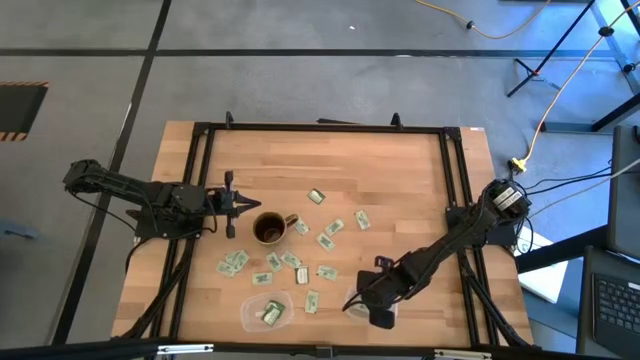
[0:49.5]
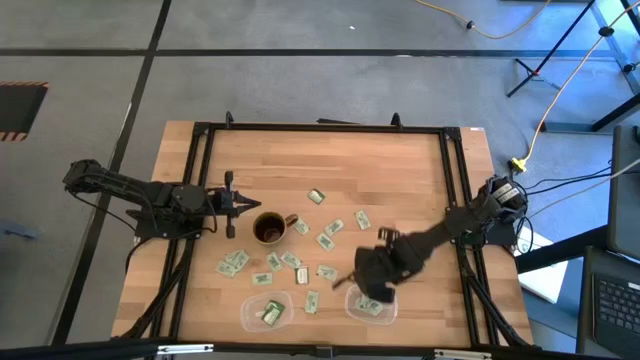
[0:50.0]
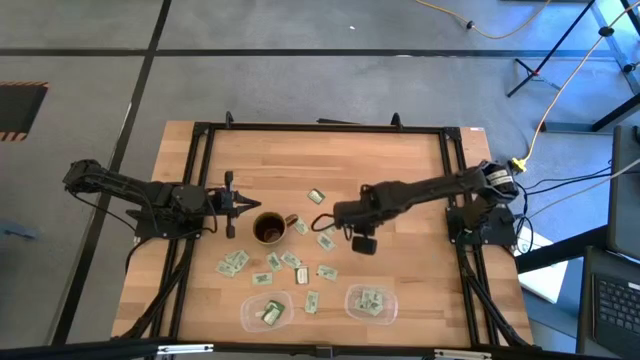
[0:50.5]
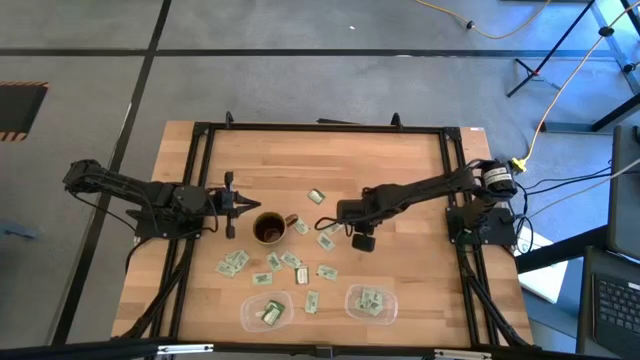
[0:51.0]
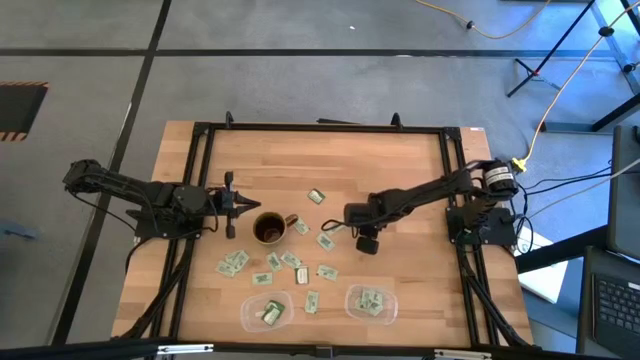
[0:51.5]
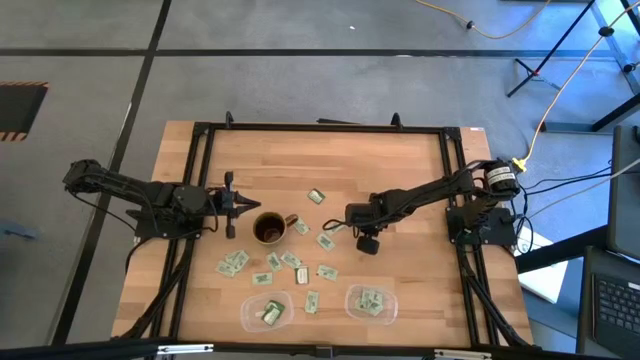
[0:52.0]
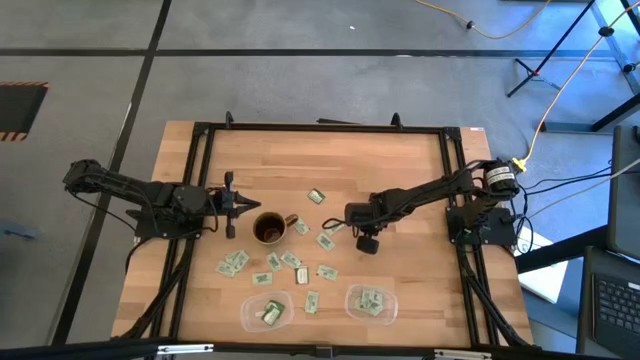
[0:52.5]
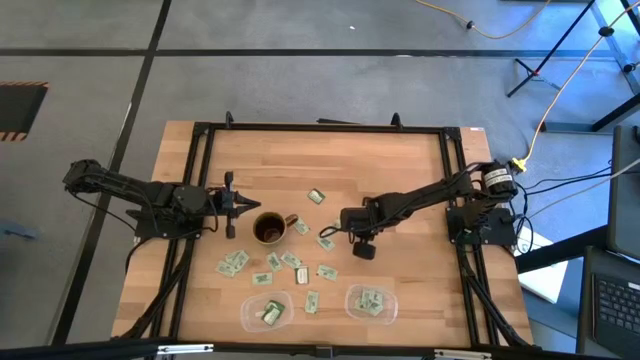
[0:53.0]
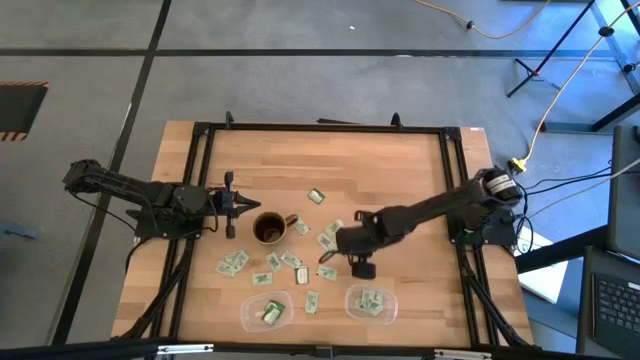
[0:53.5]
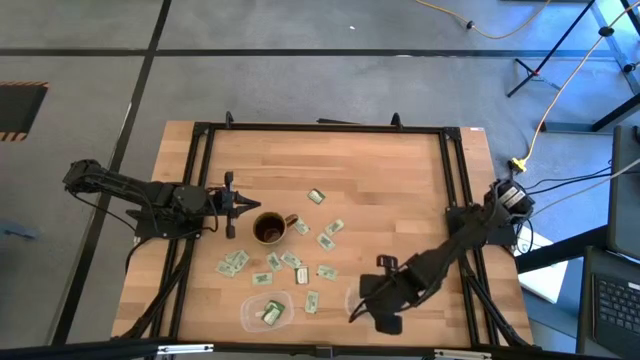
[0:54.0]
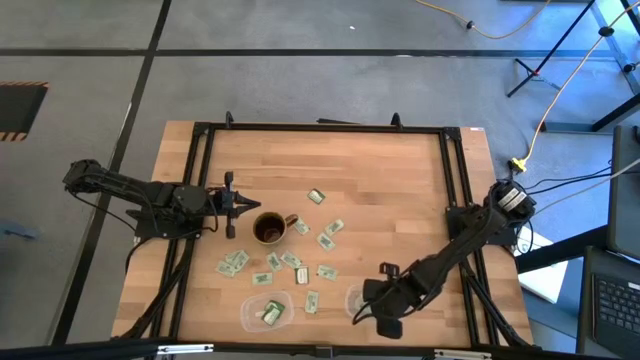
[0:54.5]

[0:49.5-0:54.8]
Task: Pick and place items into bin
Put the white stevia packet into the right transparent bin

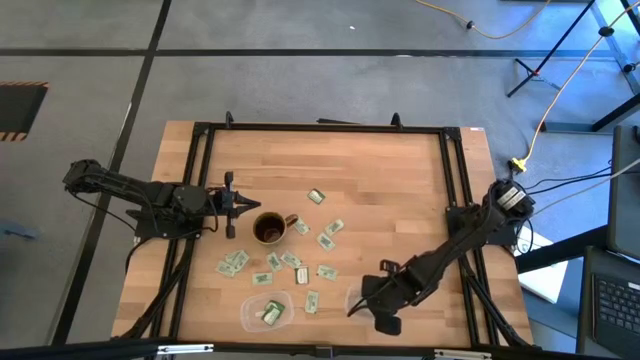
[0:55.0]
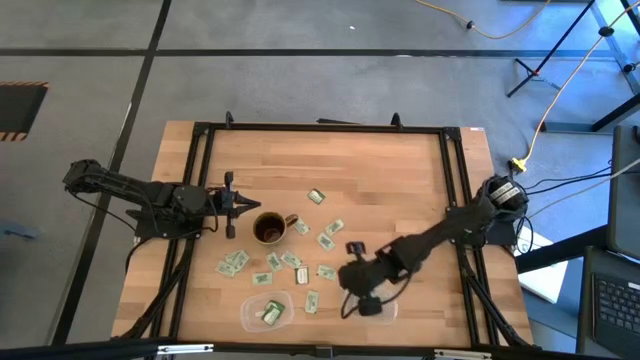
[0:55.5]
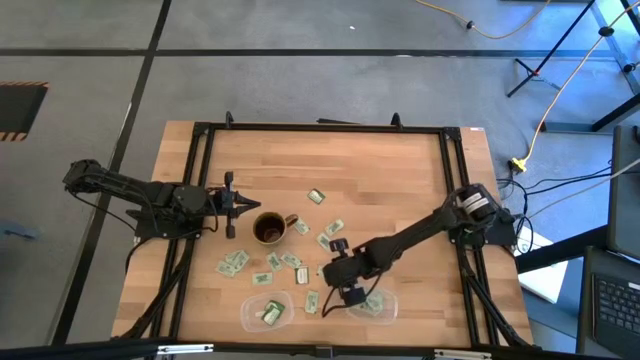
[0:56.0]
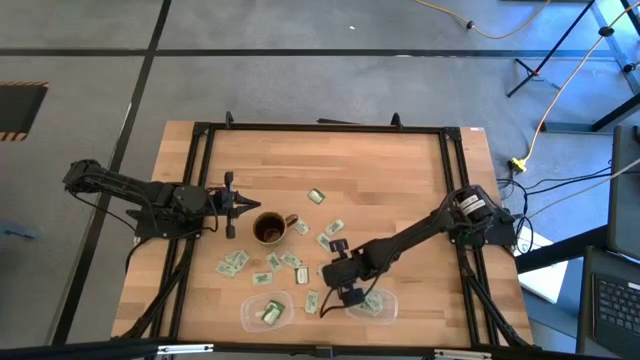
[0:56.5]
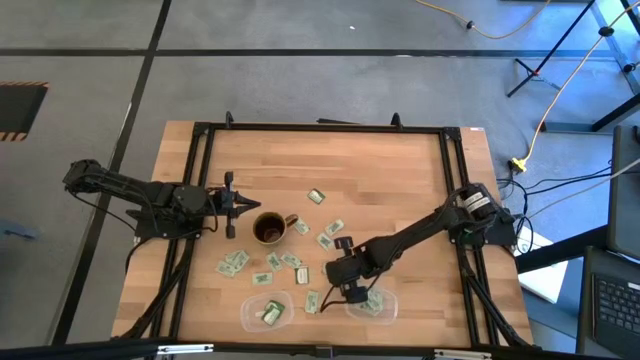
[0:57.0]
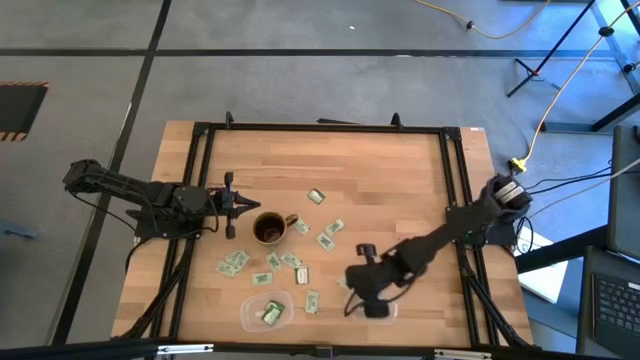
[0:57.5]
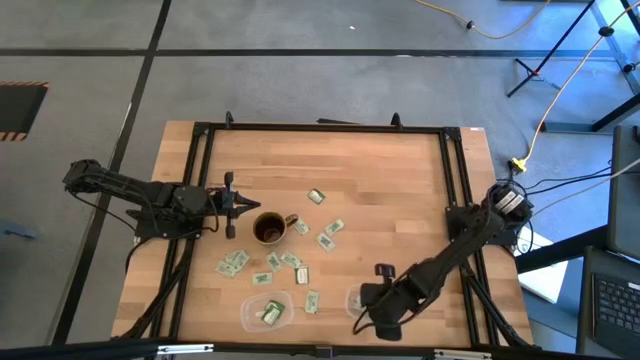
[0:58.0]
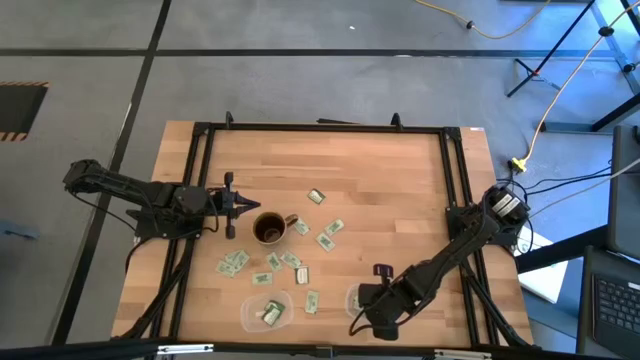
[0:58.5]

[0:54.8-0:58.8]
Put the white stevia packet into the right transparent bin

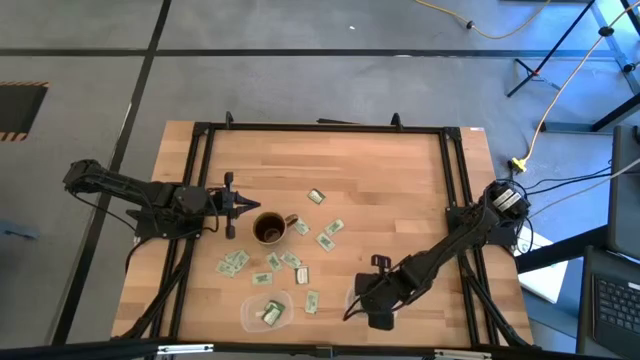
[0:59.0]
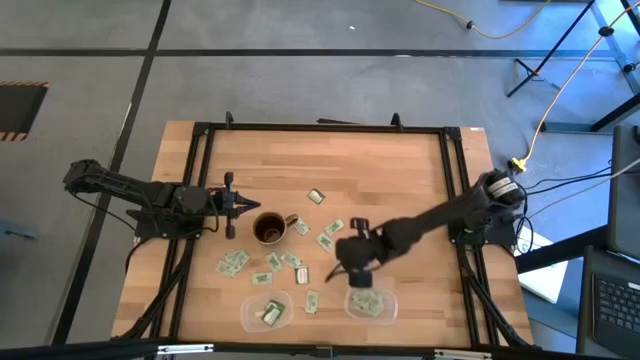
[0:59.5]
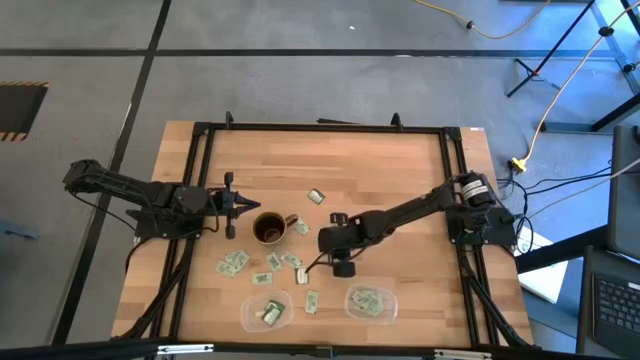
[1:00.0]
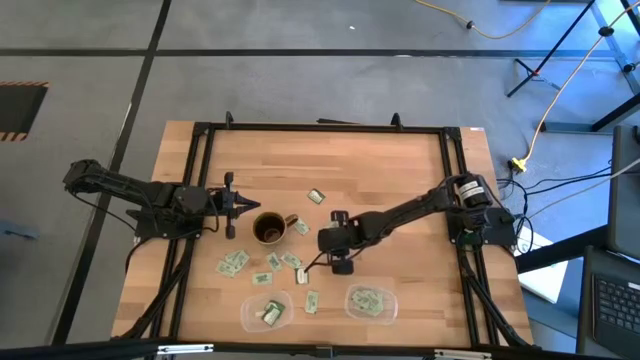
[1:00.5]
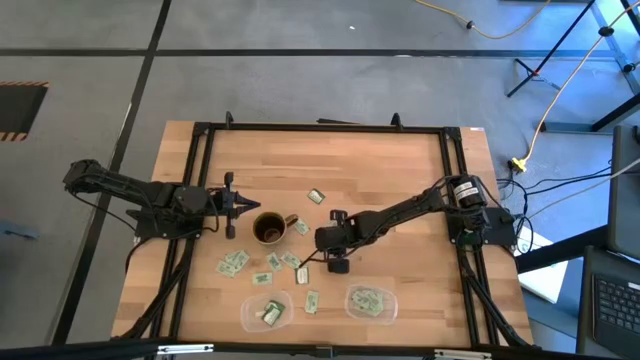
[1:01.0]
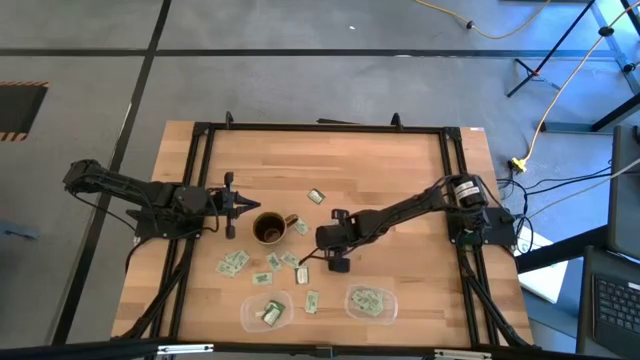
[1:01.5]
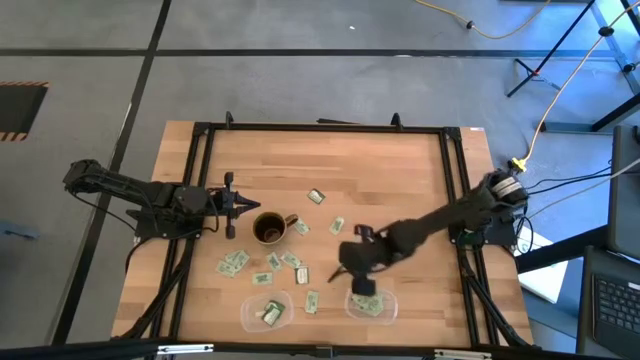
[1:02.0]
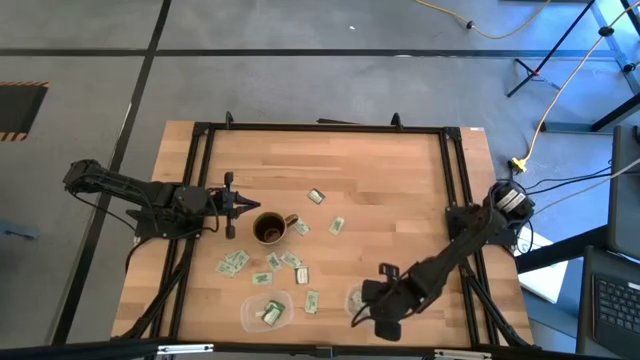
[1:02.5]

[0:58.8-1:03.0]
Put the white stevia packet into the right transparent bin

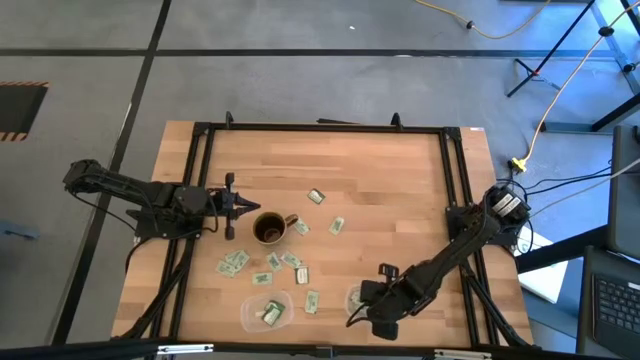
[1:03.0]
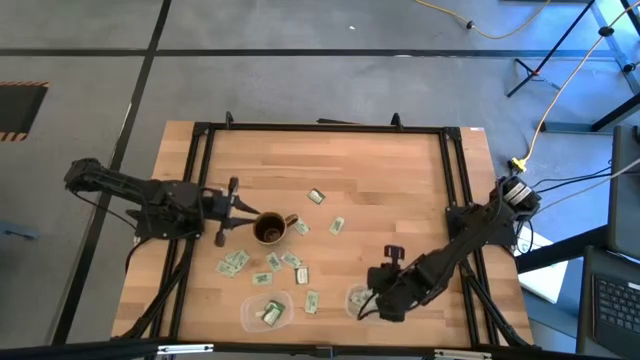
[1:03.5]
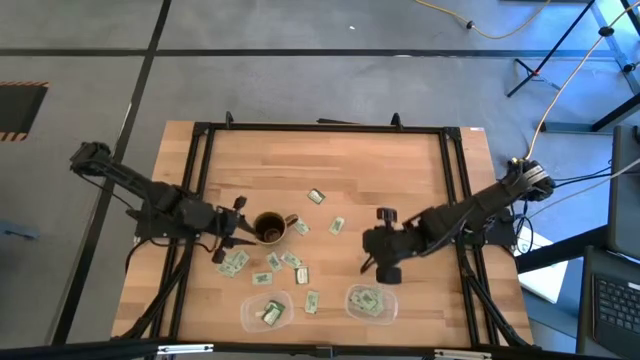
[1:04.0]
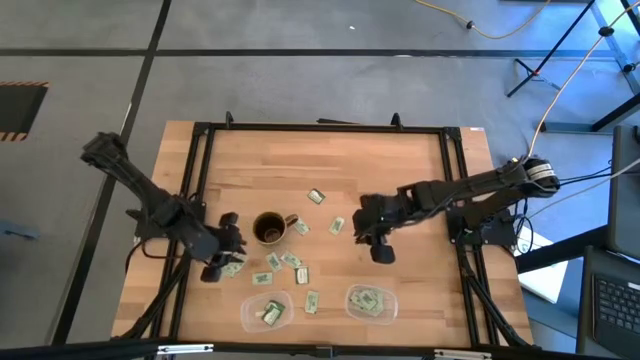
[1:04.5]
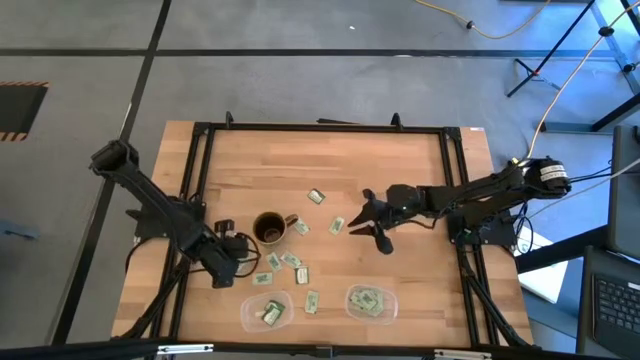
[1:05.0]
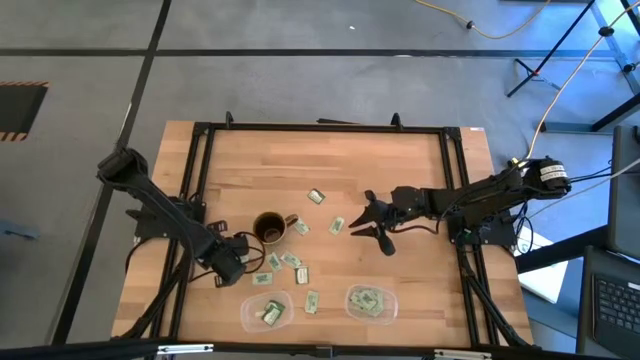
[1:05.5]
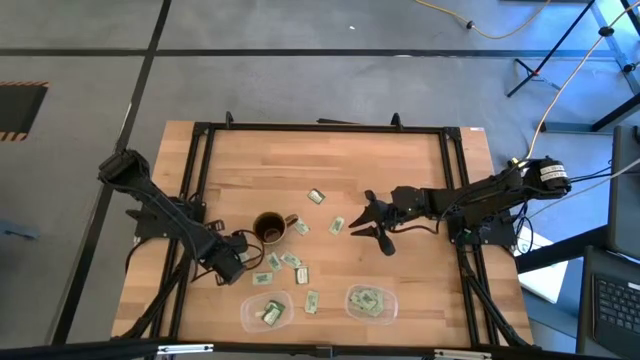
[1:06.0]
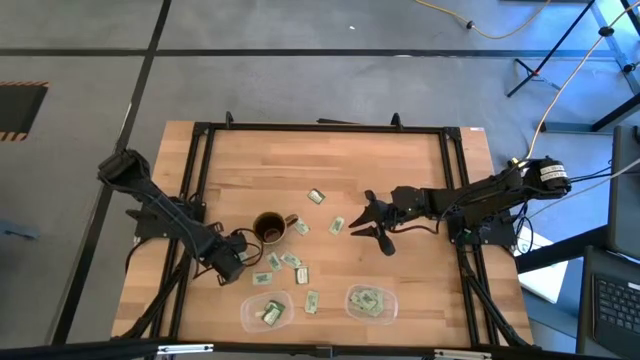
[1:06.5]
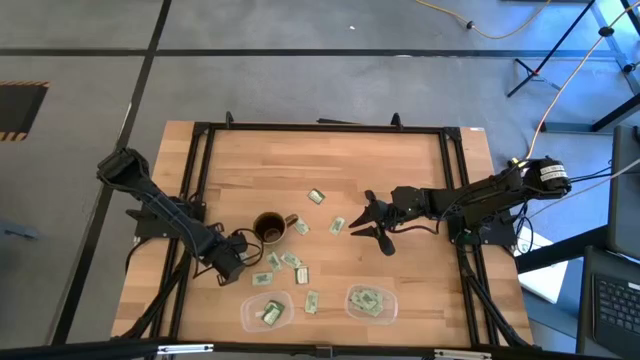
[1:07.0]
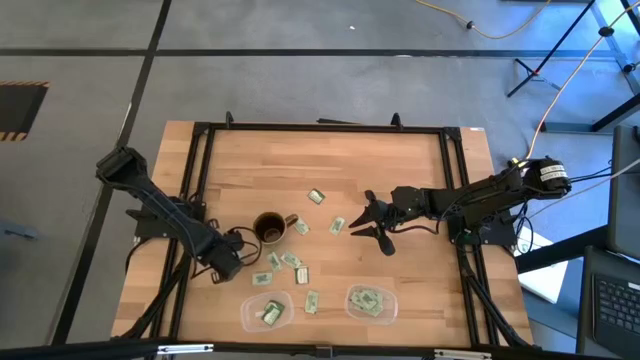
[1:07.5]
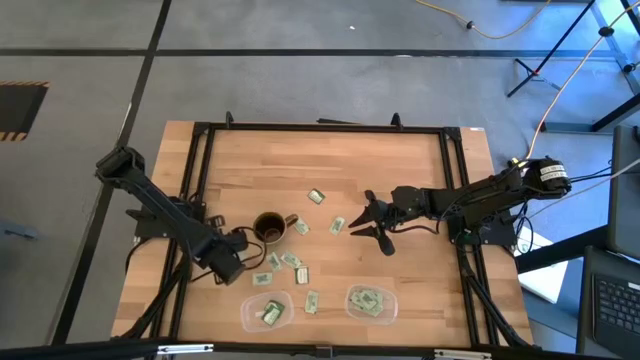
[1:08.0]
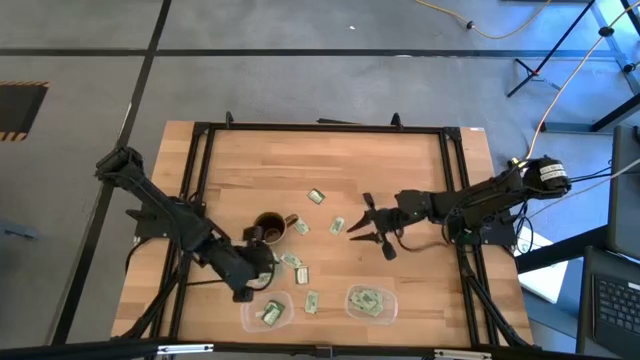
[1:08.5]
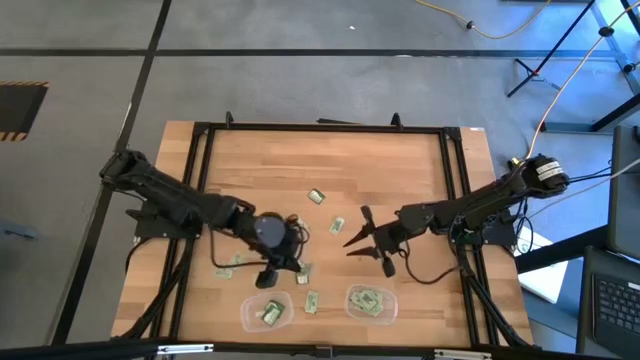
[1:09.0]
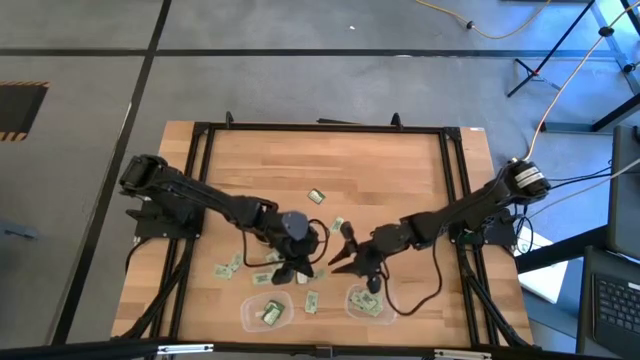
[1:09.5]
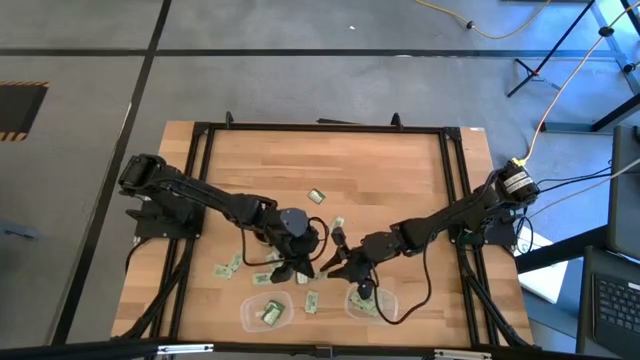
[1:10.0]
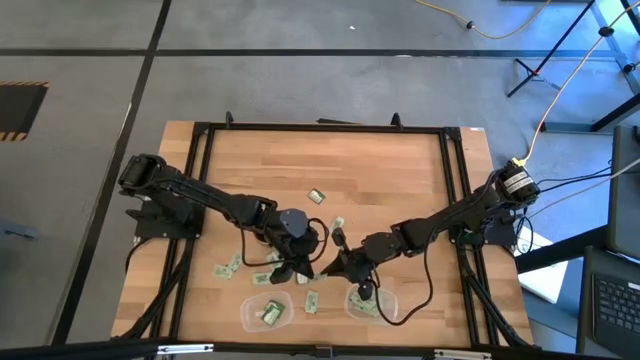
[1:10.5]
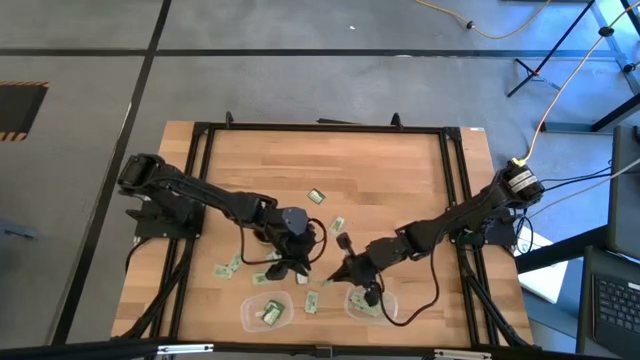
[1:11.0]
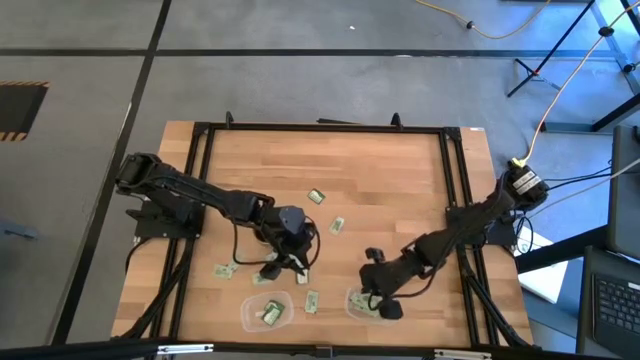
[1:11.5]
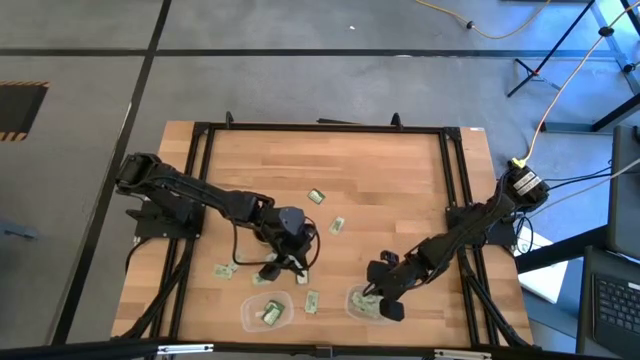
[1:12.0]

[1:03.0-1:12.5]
Put the white stevia packet into the right transparent bin
